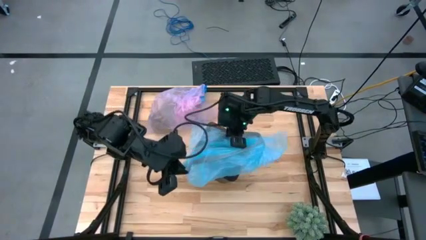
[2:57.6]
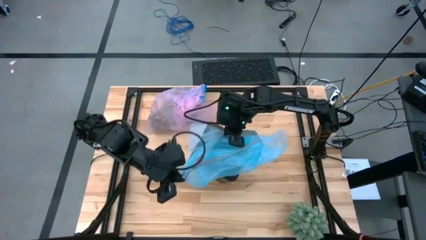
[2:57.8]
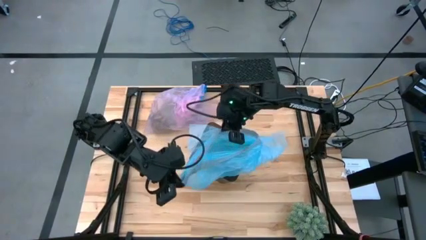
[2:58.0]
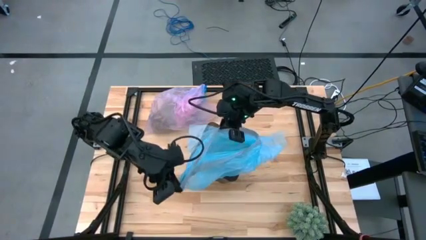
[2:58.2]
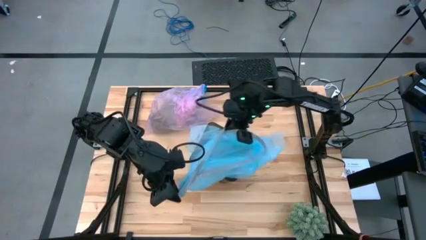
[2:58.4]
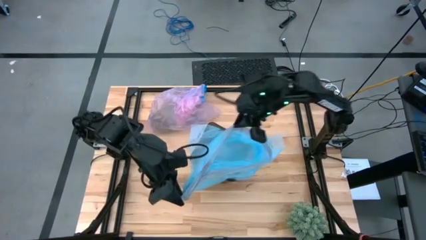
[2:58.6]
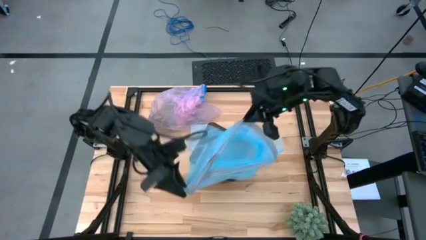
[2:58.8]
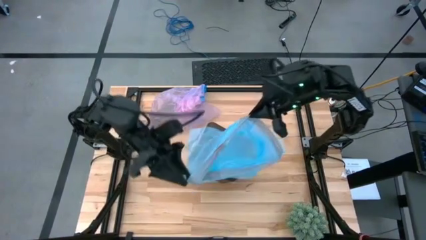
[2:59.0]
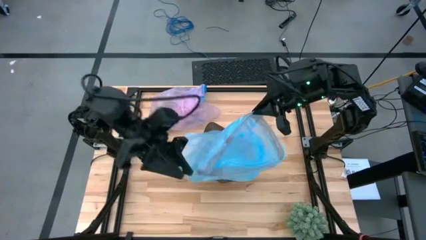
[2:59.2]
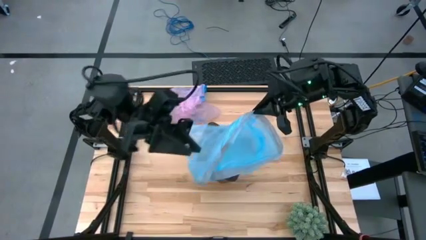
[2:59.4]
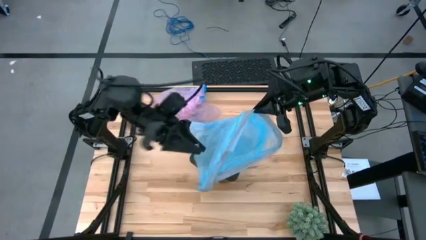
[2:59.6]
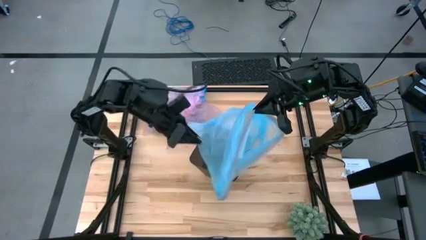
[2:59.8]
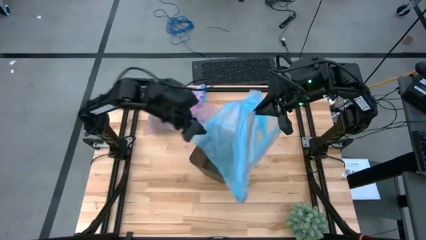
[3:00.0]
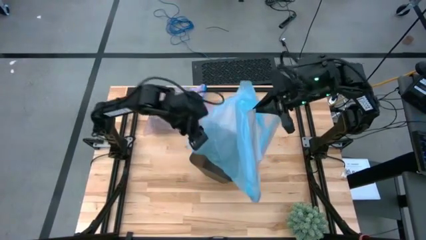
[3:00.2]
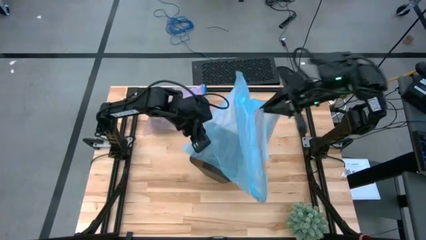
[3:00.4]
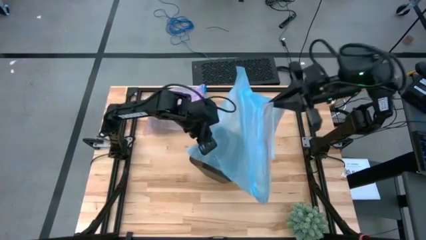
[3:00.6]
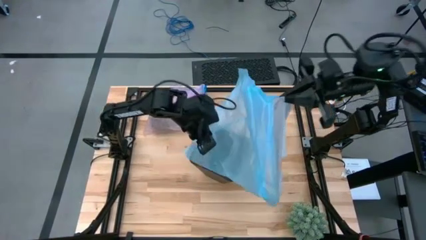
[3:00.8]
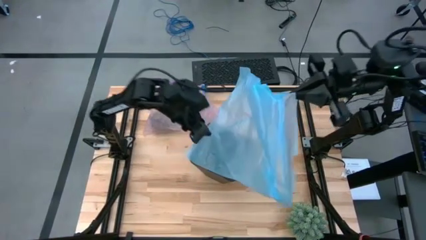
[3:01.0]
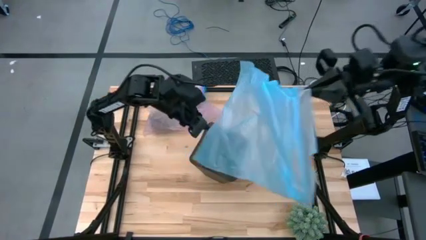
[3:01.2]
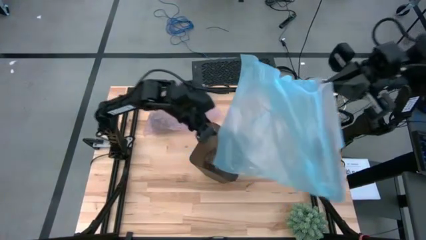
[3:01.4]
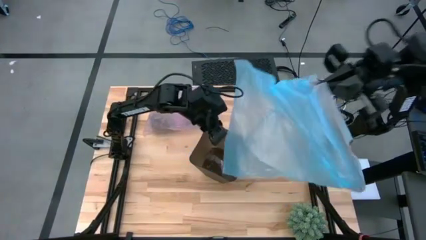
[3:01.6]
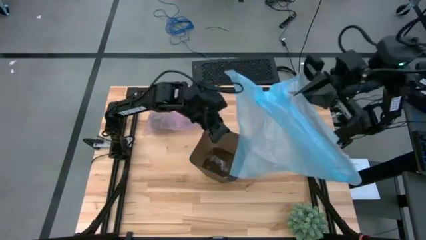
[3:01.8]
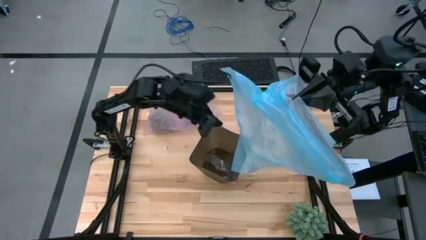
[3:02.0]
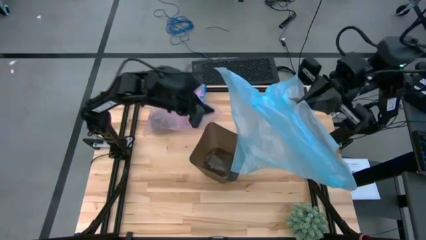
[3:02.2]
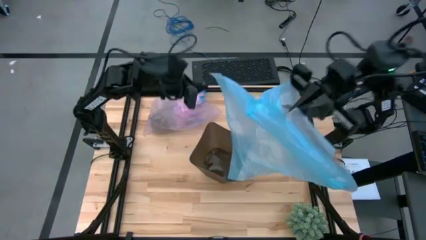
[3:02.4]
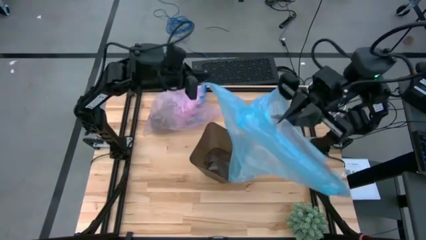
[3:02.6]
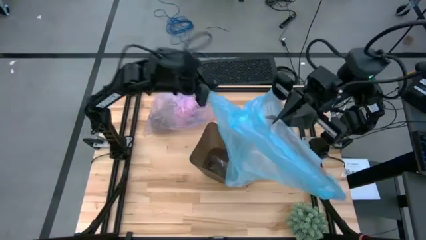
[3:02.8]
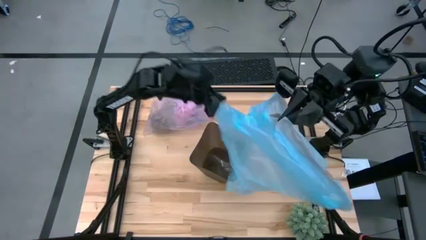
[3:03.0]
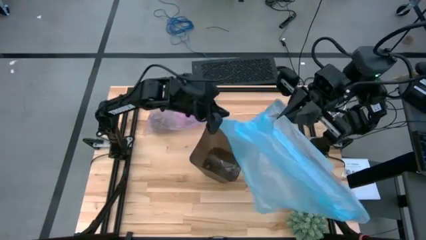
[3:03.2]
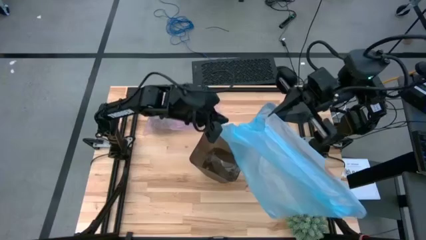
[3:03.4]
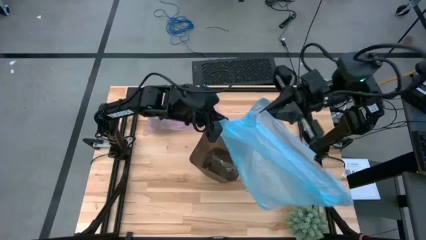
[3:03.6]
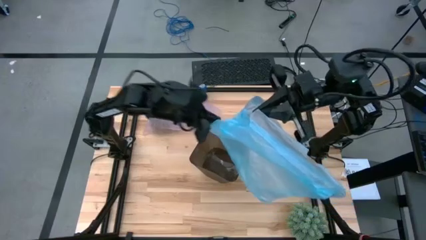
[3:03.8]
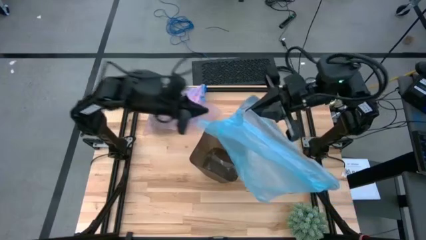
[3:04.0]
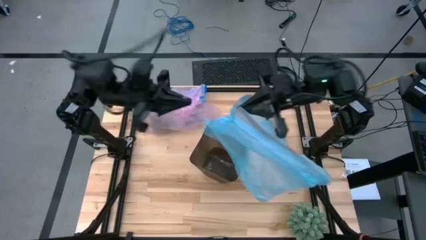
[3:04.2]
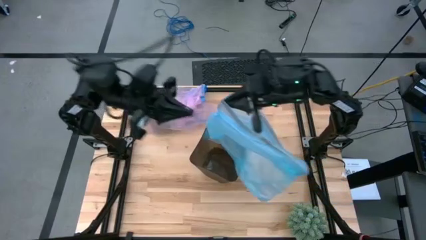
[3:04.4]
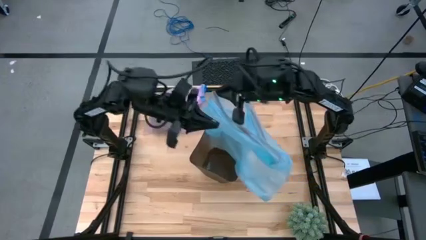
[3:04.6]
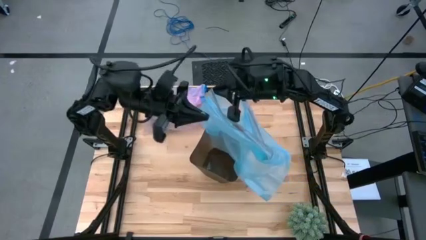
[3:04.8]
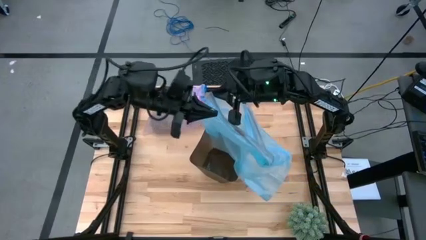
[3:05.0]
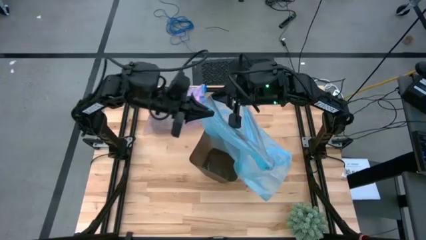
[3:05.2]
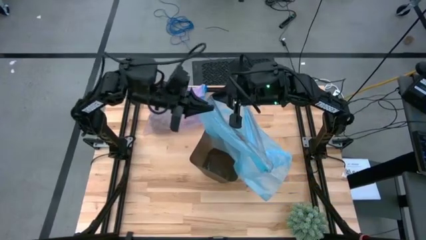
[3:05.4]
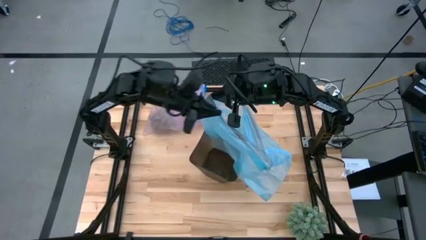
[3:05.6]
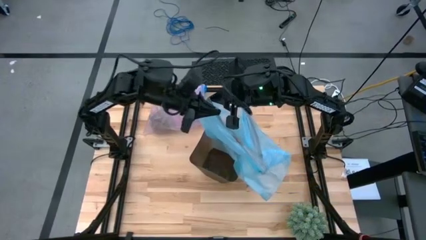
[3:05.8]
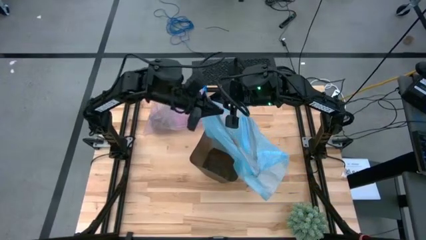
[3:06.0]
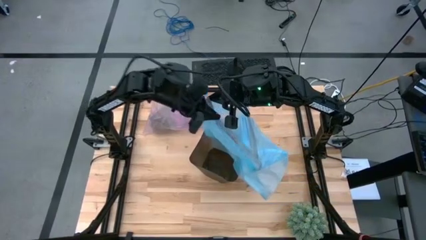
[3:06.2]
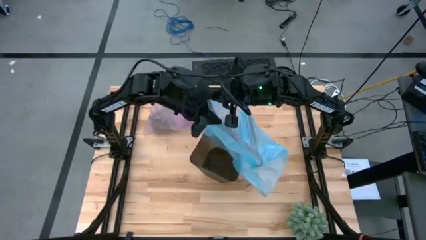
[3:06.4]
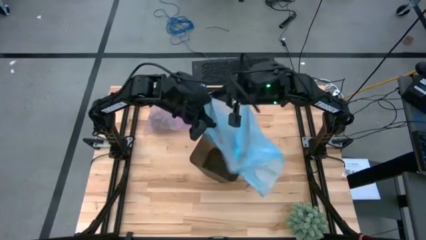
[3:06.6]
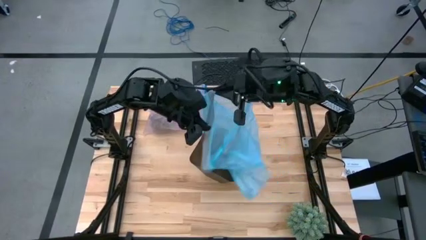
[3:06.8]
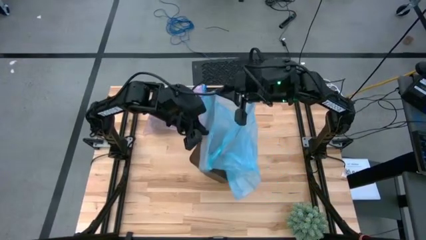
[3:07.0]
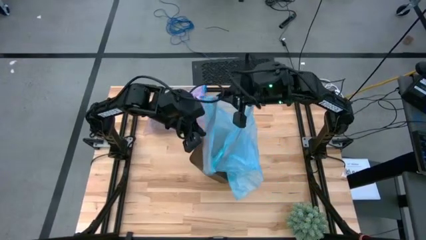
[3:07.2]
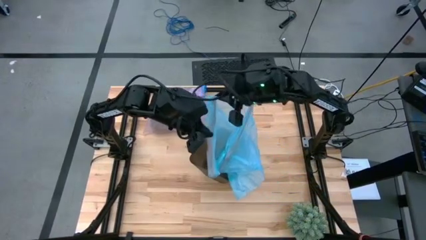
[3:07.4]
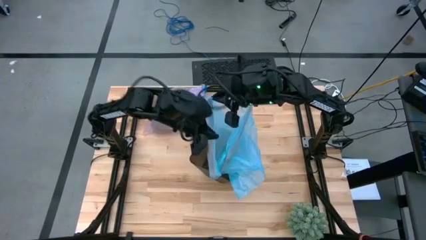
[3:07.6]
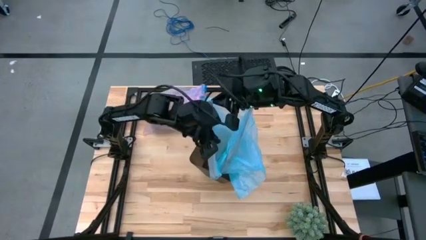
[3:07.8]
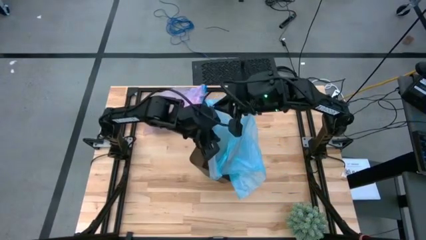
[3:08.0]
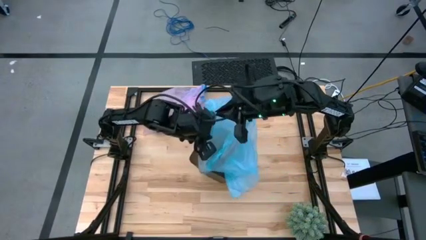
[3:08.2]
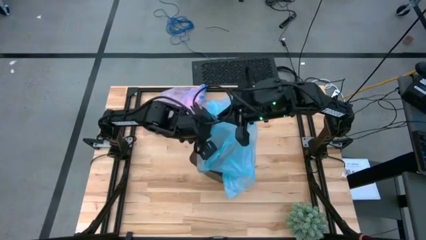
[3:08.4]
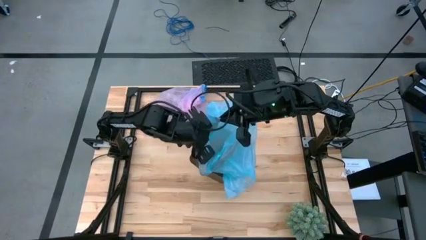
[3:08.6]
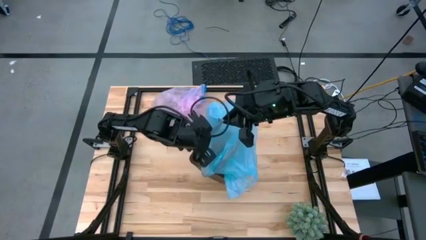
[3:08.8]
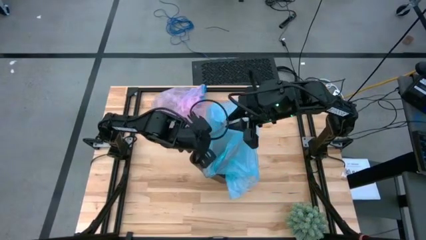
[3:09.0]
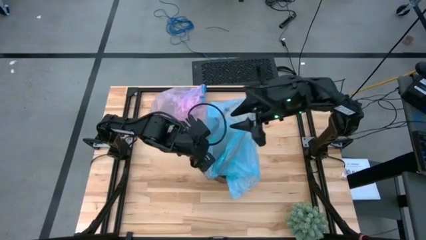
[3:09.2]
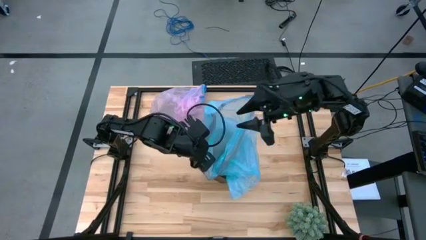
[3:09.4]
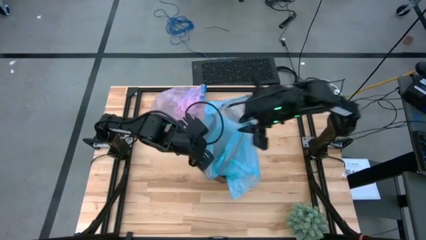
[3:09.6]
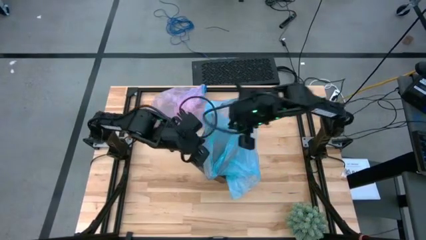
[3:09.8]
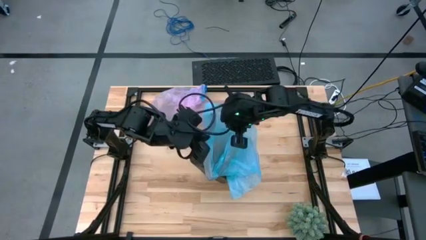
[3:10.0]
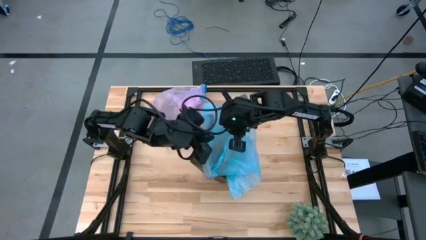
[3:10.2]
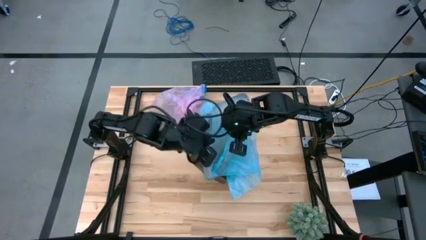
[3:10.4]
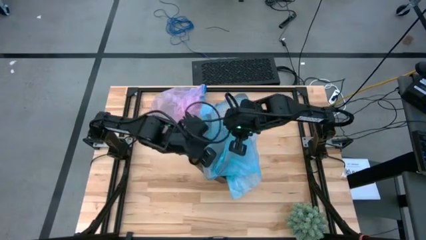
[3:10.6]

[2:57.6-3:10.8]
Task: place trash/remove bag and relplace
Insert the new trash bag into the trash bin
